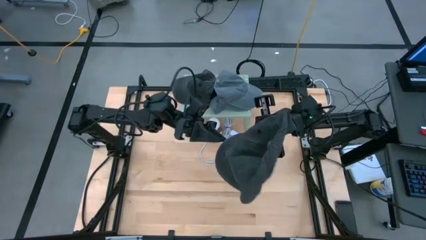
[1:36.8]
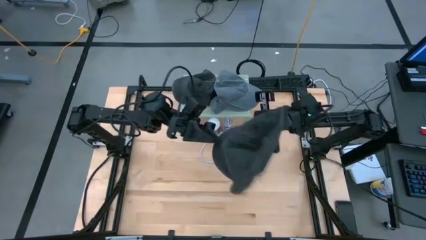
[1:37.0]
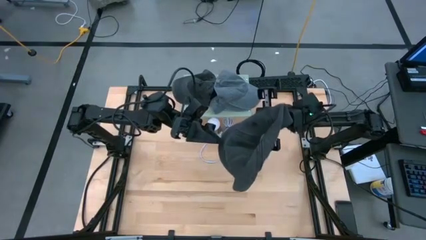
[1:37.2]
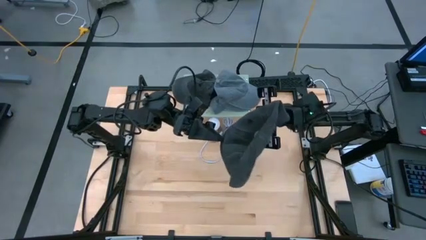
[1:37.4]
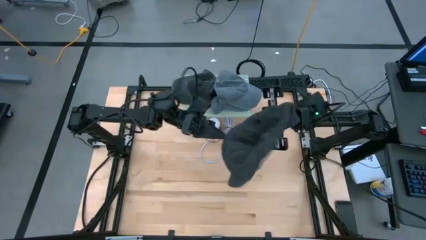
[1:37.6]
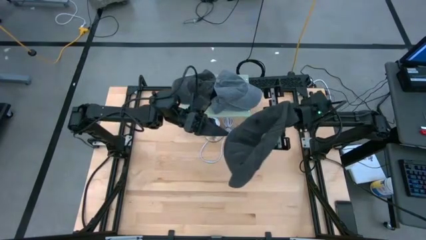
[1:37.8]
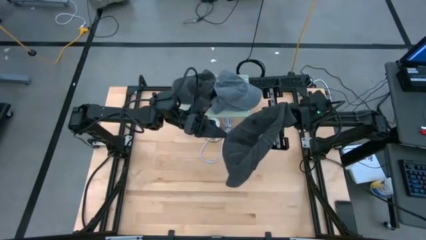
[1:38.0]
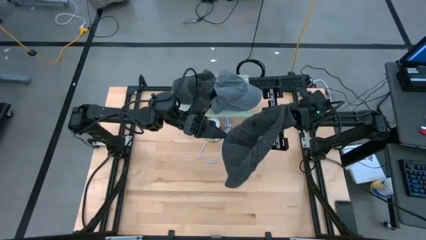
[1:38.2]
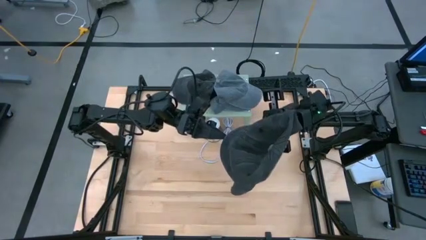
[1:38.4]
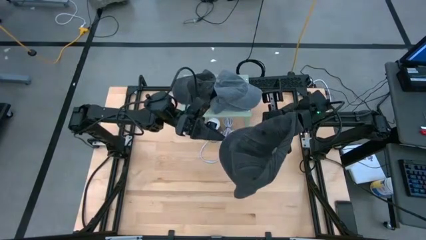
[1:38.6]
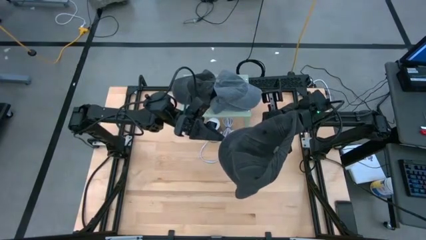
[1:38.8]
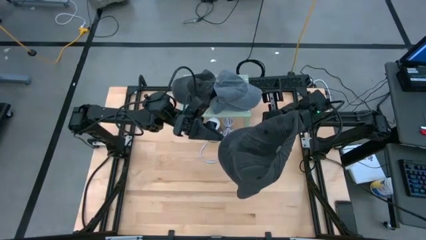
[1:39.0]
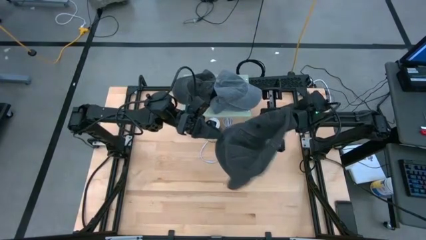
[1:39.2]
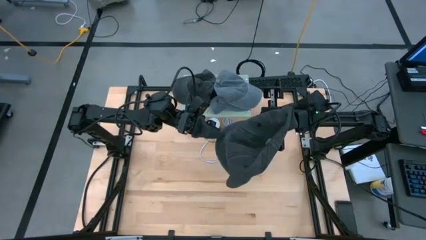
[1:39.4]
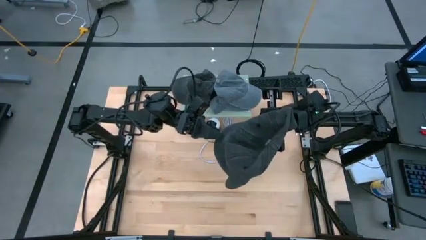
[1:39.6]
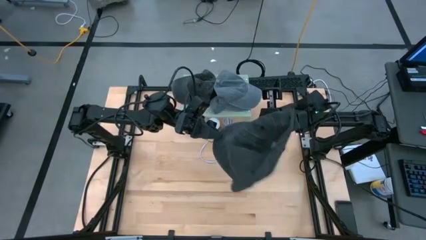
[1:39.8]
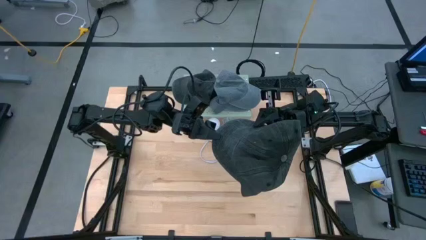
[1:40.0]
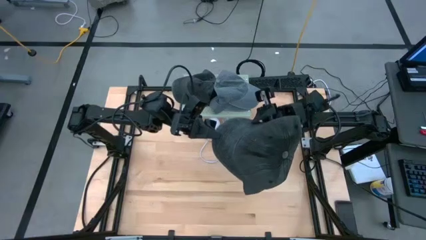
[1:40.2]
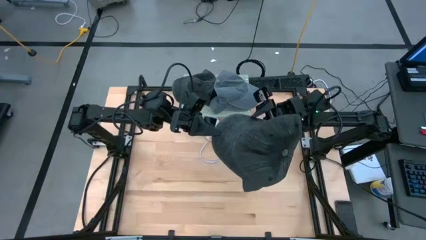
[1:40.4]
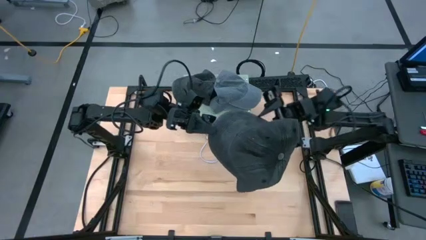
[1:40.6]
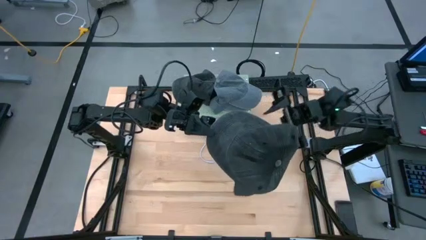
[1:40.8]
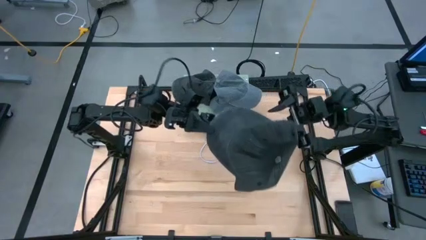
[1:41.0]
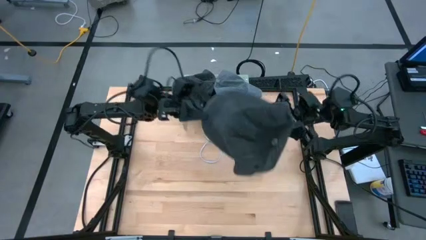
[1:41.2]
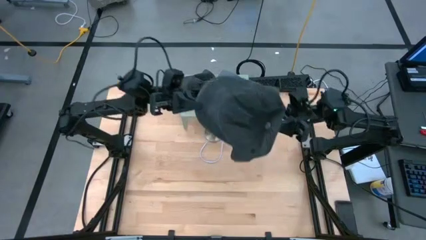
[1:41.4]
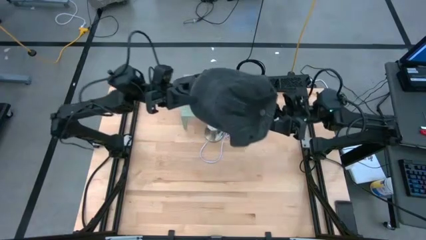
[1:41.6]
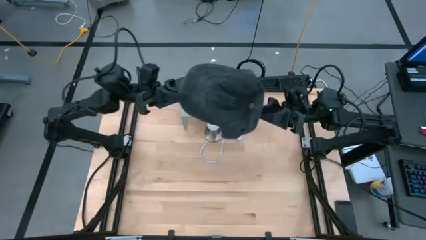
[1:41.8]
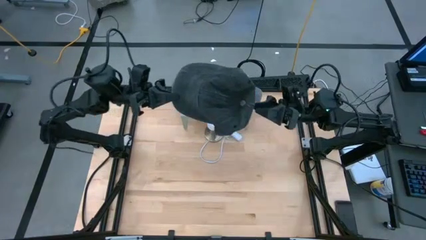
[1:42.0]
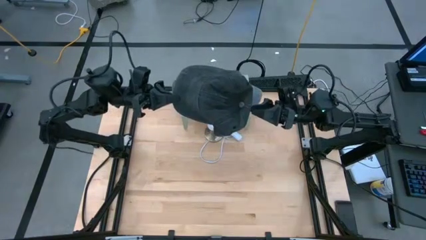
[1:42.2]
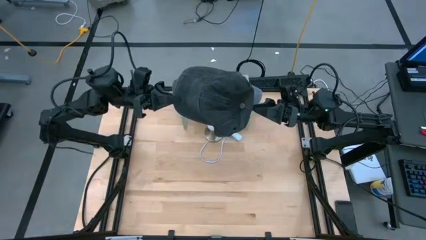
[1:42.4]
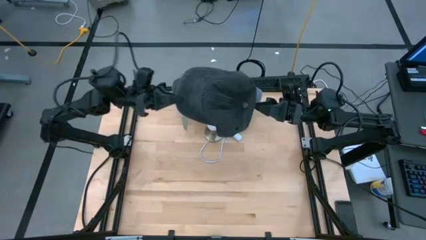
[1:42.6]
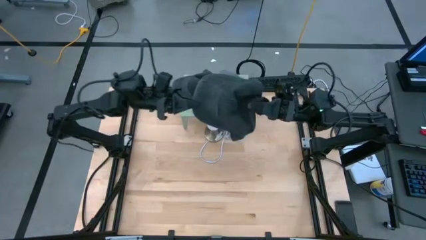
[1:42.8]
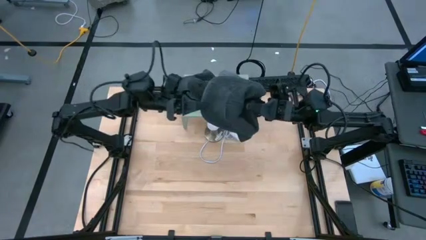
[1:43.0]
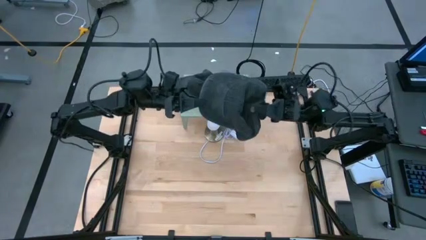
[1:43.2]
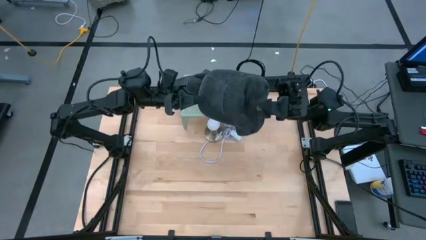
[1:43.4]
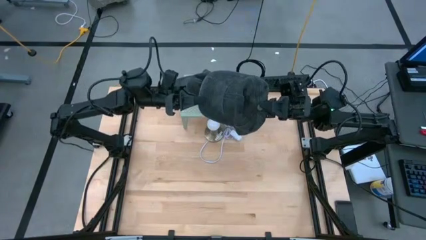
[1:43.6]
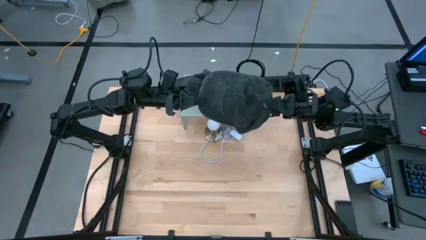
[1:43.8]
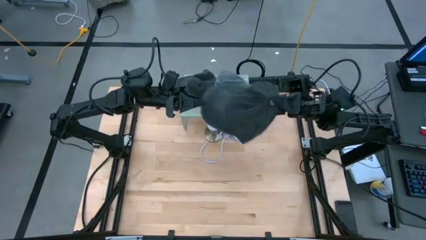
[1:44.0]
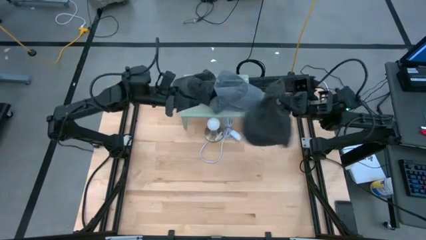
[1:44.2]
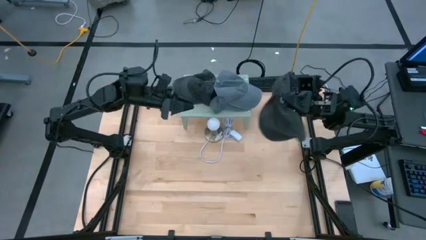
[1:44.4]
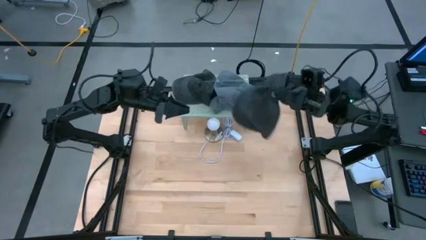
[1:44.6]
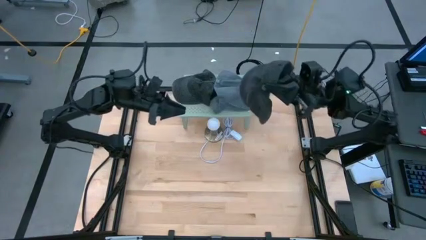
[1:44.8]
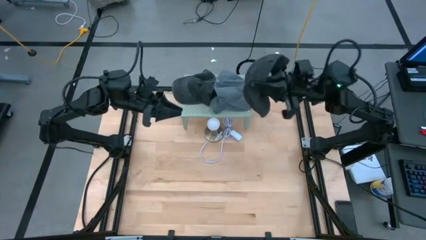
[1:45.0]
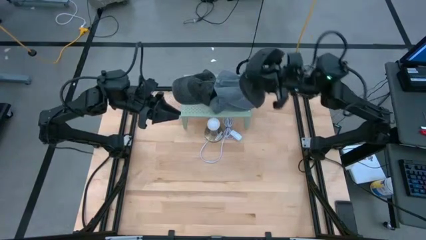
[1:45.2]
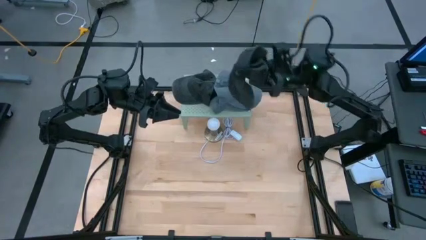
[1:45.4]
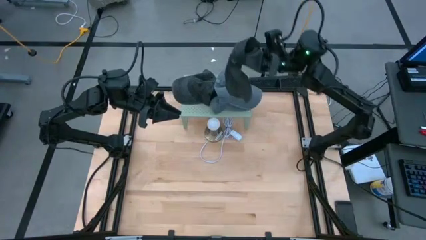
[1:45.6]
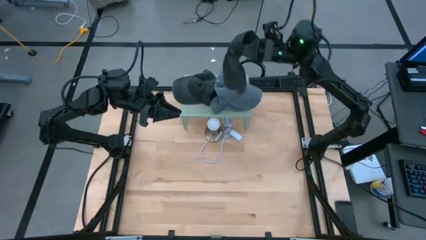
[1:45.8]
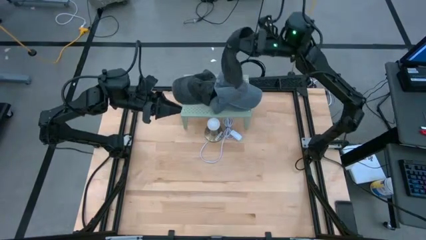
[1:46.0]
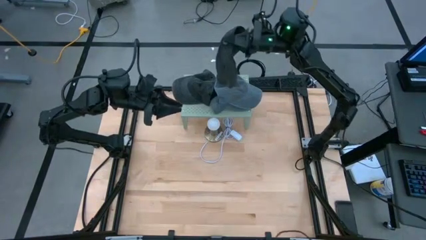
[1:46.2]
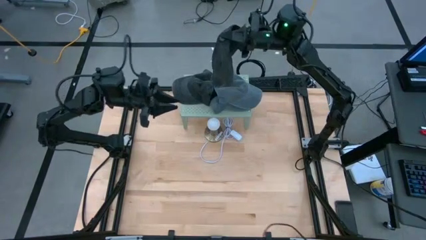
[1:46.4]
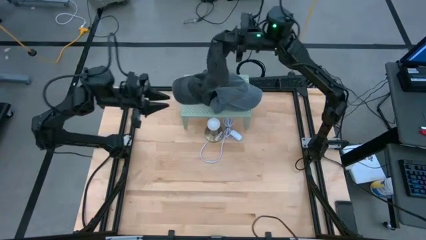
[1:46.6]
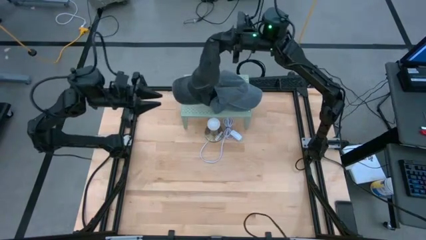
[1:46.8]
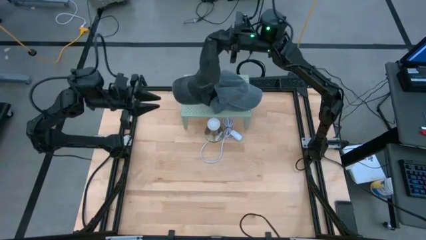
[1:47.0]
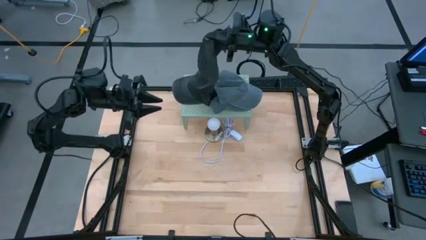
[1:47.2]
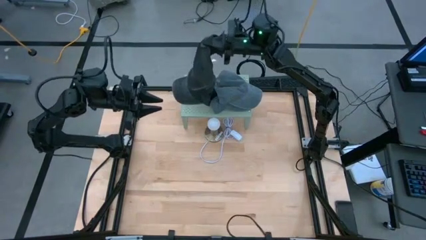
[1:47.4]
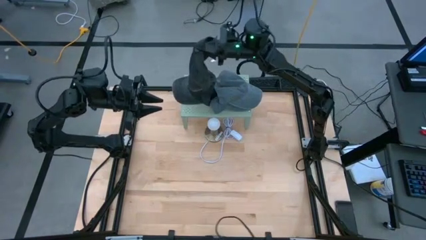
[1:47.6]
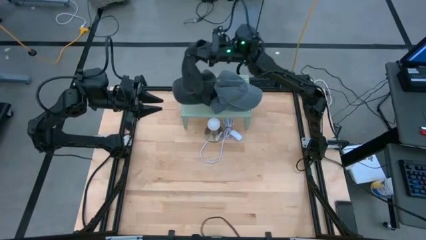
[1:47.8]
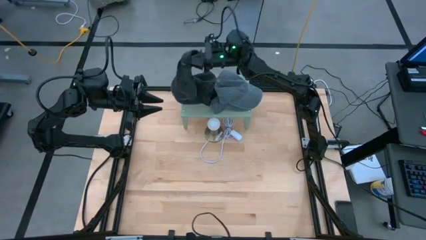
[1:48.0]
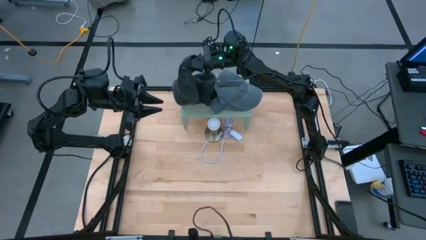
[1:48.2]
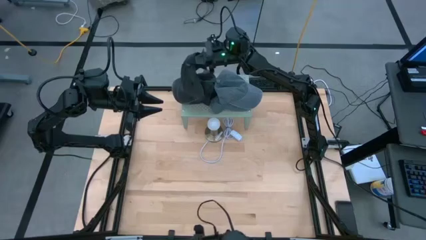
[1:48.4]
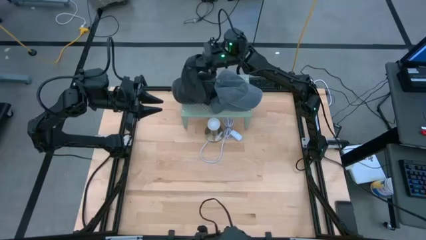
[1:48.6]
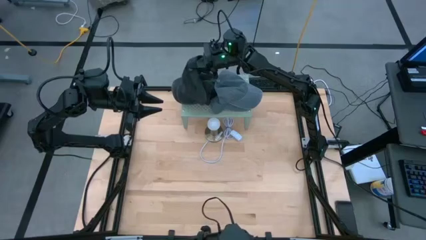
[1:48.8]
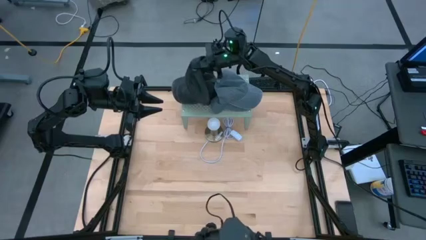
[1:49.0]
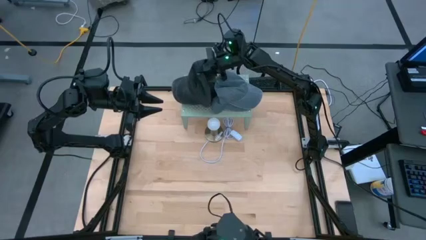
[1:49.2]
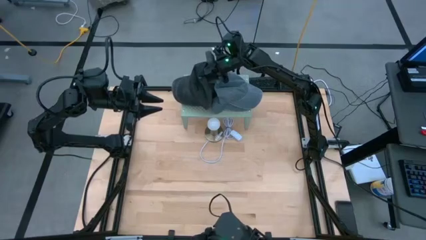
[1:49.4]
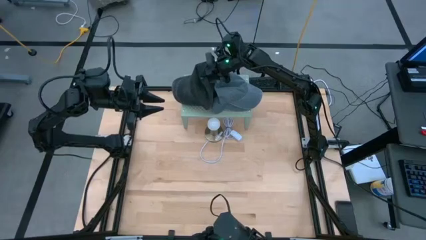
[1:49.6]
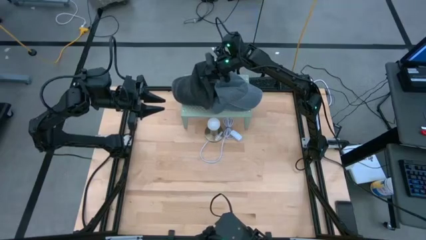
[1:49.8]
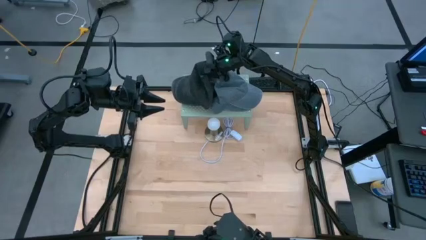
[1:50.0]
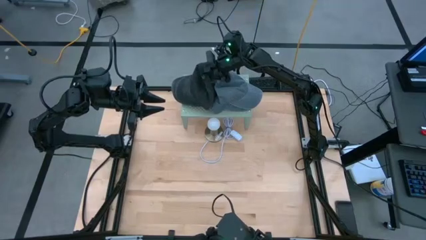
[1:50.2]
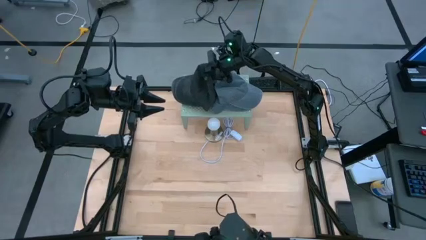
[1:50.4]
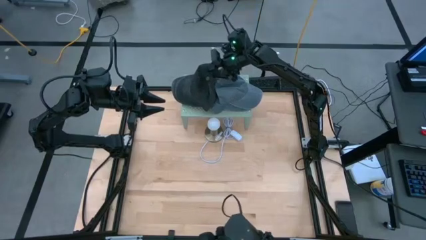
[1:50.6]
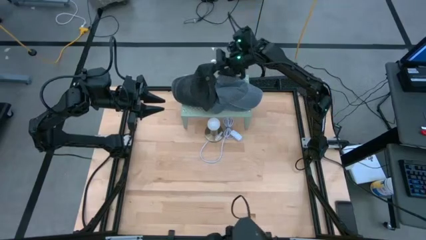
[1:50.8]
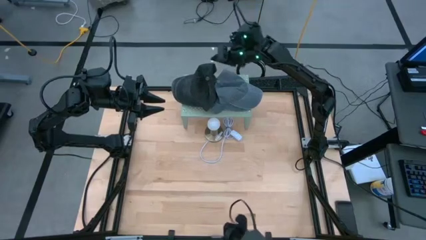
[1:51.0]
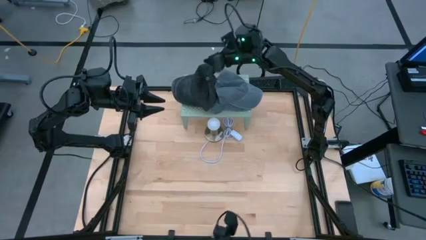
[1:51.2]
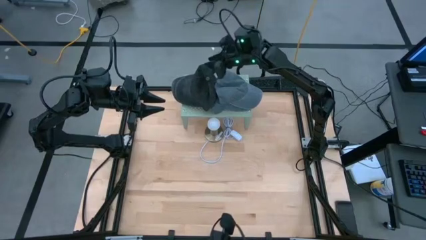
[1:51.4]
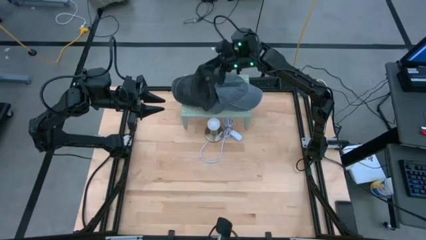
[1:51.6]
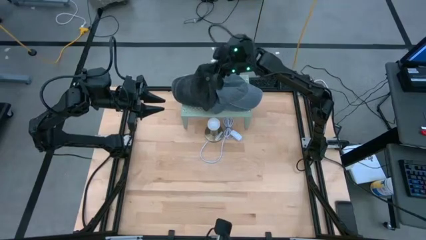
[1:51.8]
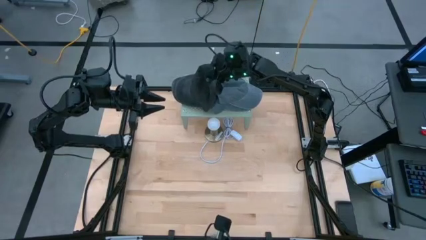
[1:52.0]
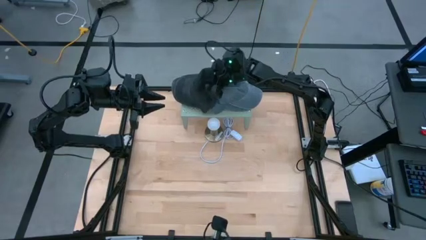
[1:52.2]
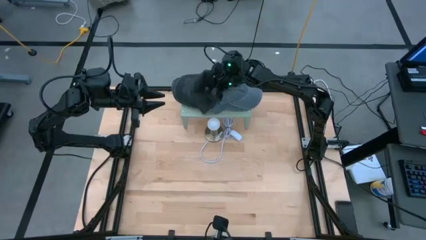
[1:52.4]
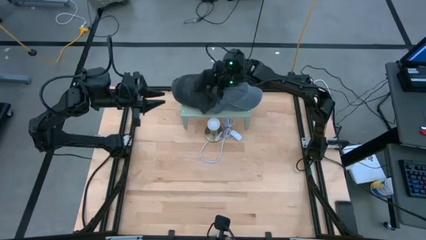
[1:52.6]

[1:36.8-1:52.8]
Task: Pick & Place hat
Stack the black cap on the other black cap on the shelf
